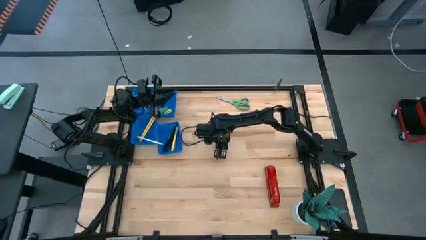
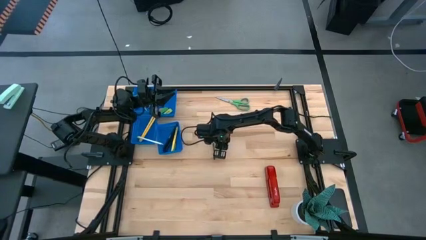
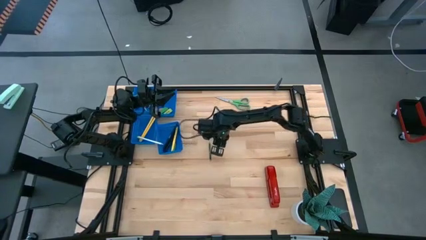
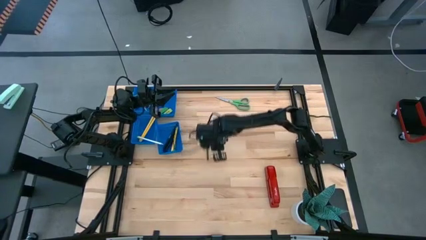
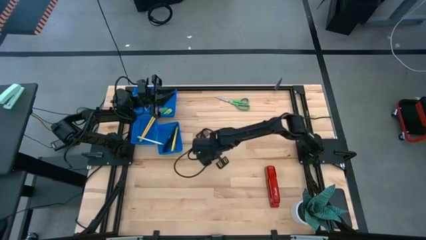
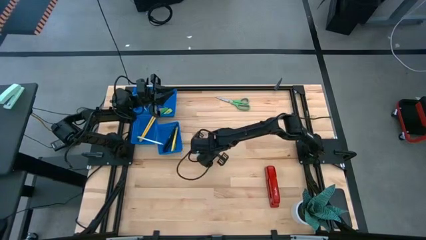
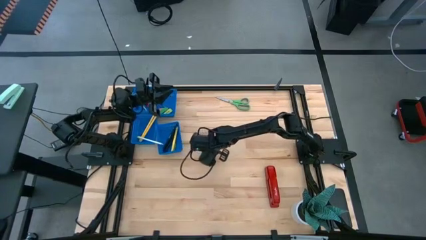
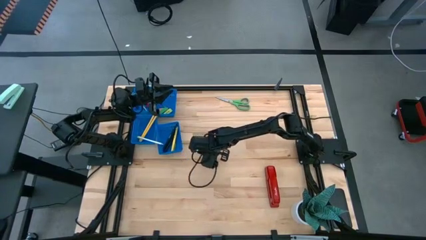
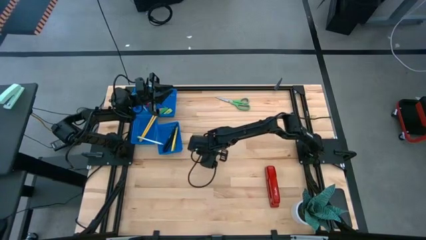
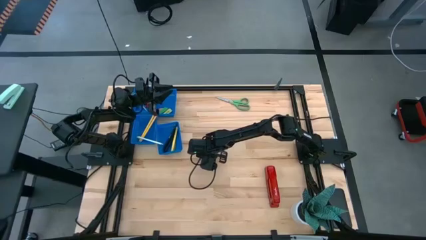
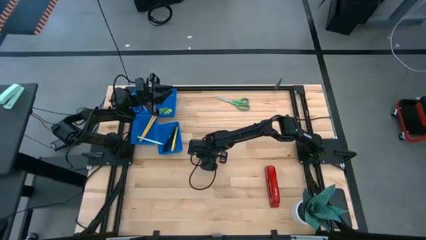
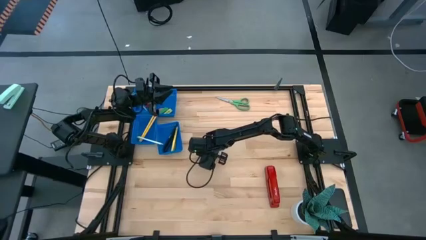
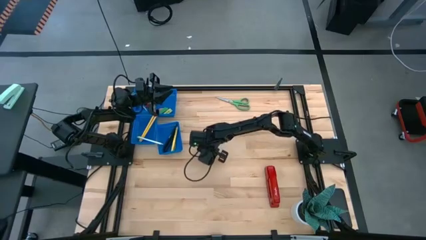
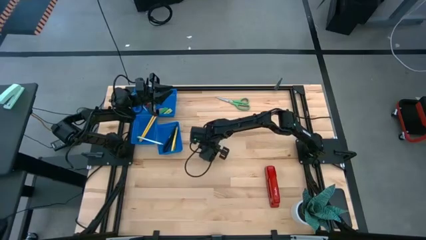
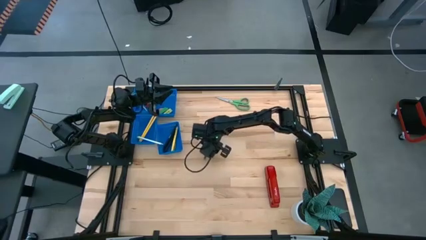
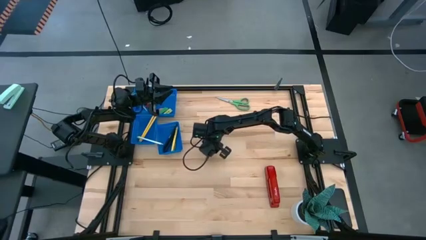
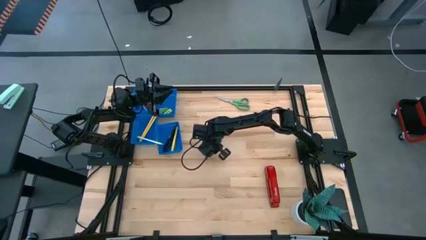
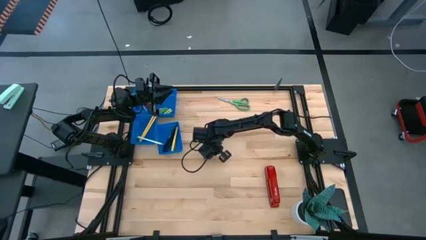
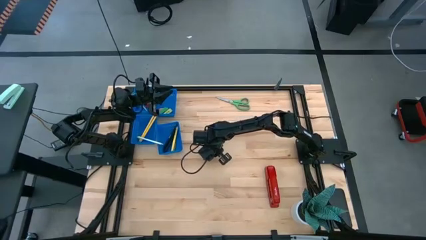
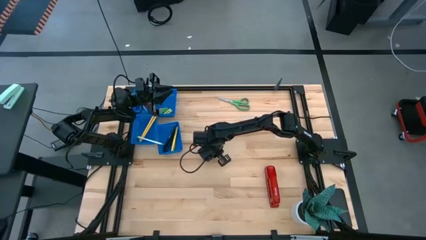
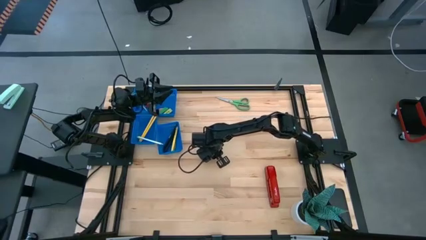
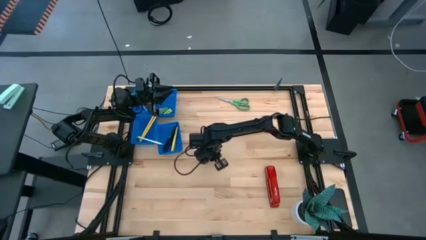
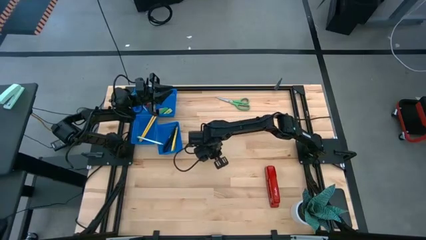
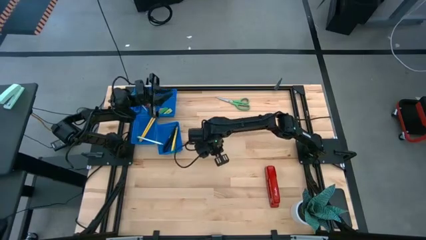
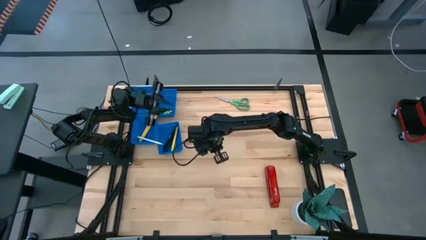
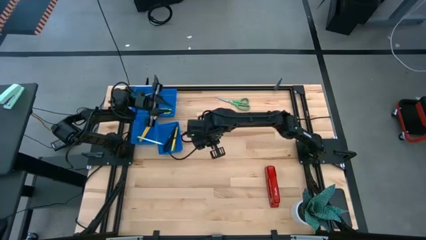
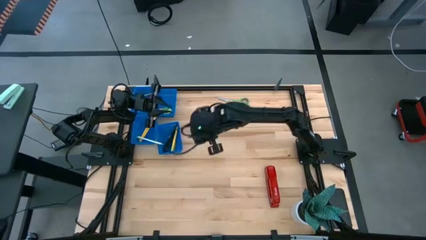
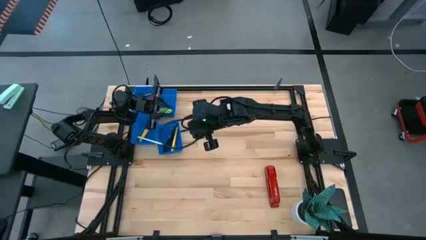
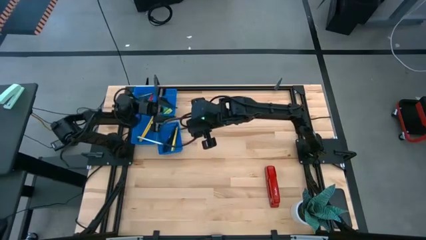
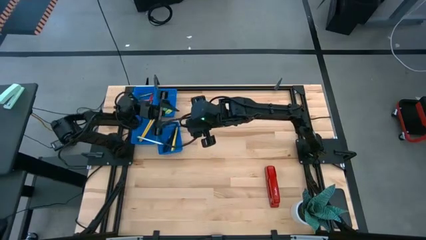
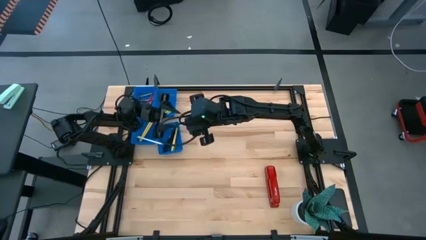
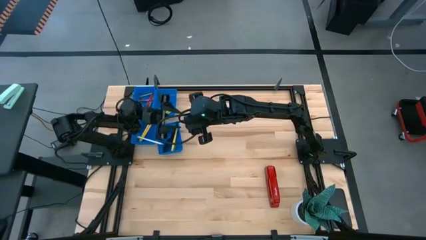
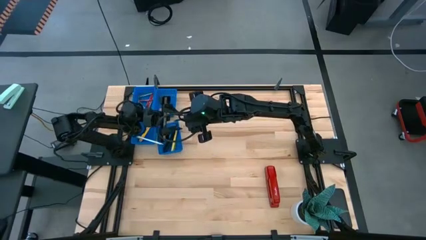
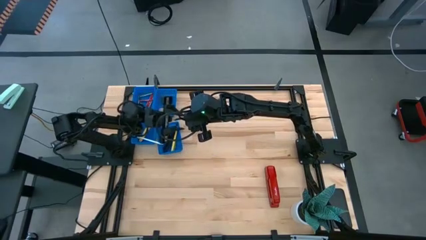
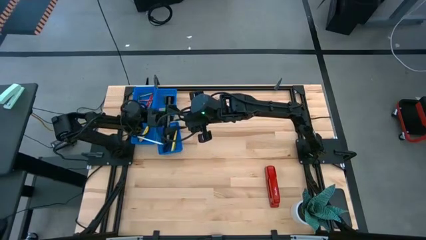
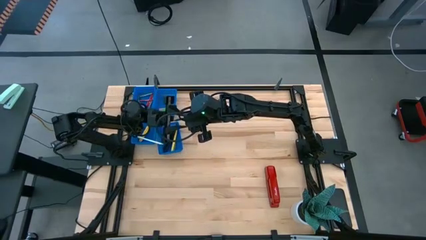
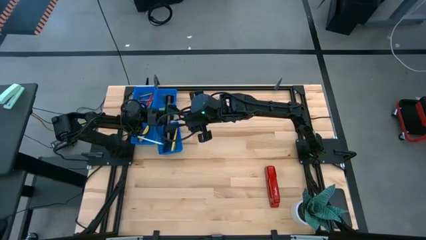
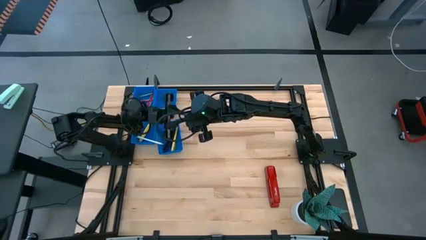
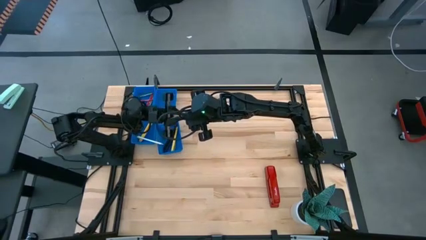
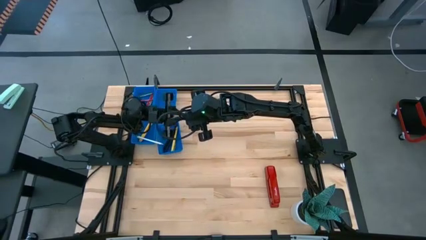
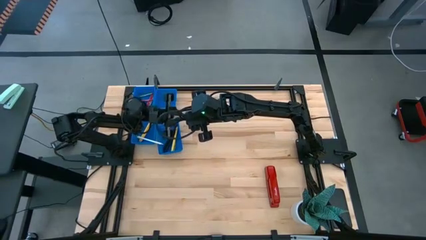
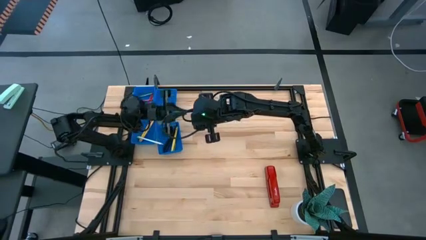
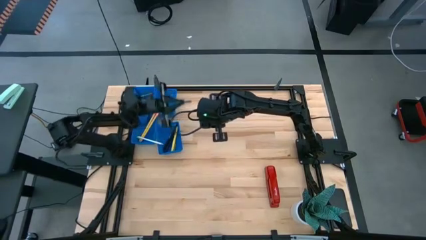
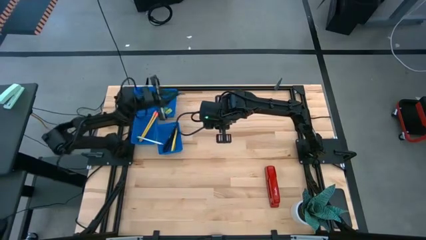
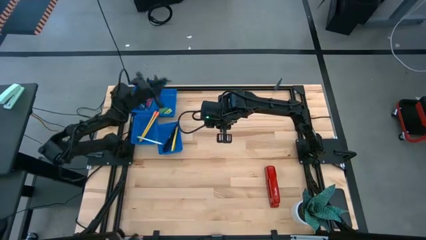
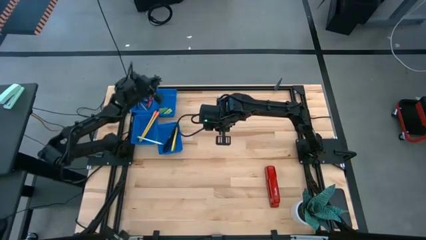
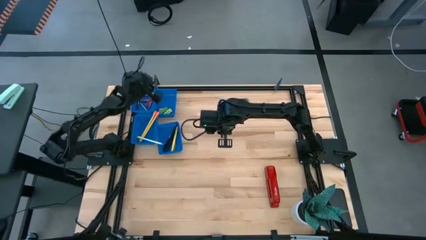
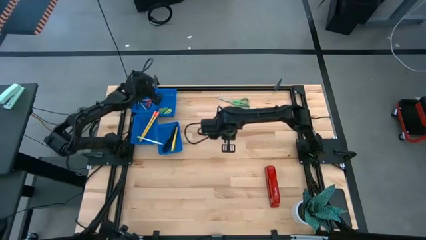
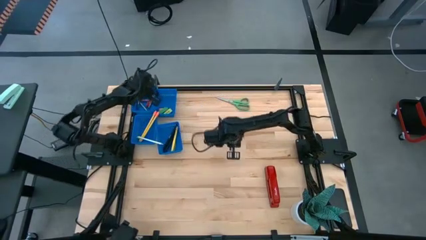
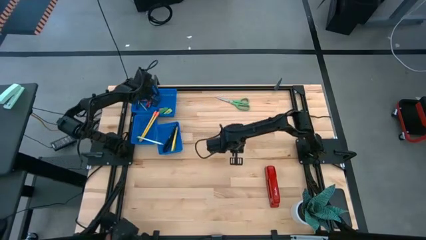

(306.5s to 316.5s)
Task: Sort crayons/erasers/pens/pencils in bins
Put the green crayon into the top left blue bin

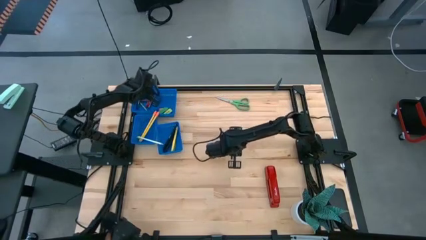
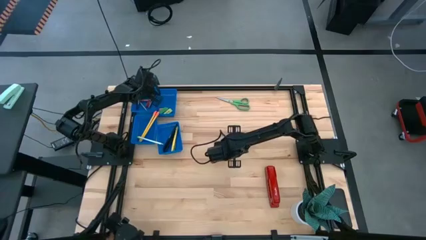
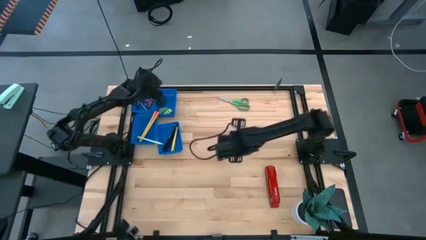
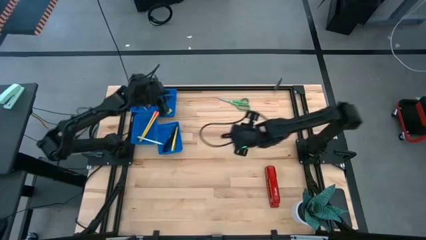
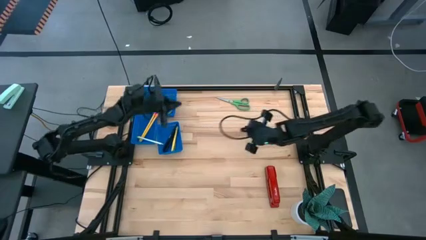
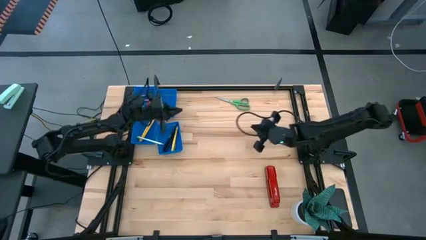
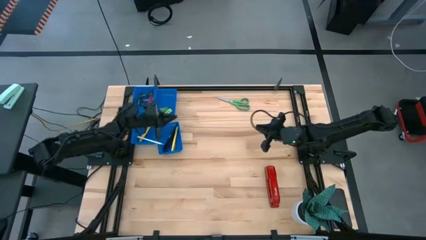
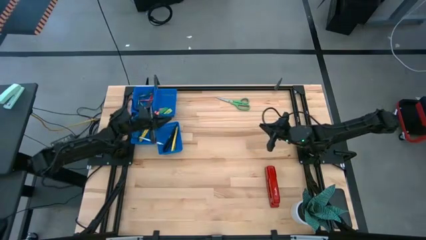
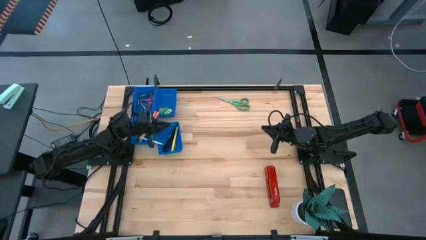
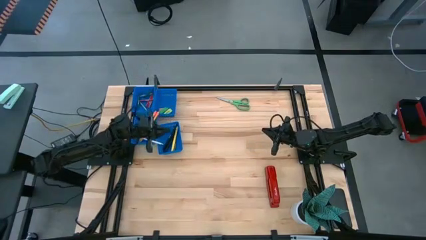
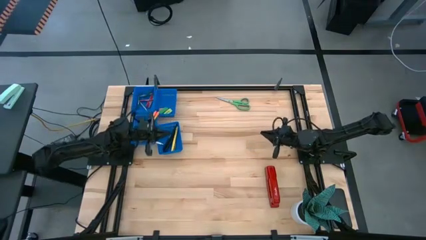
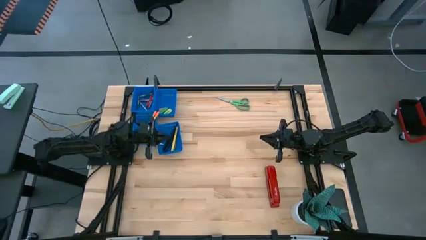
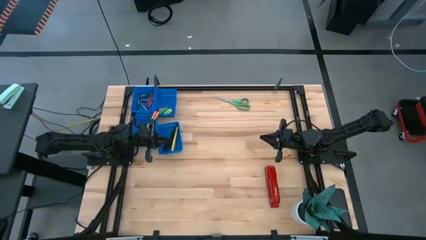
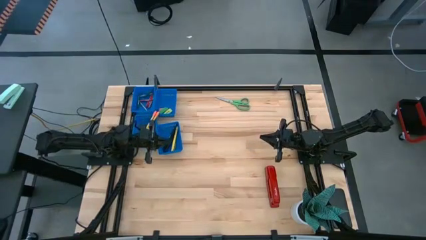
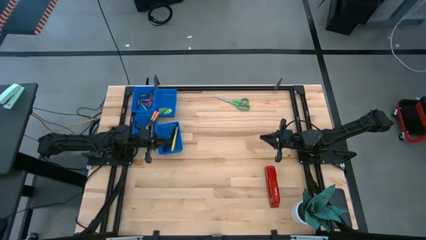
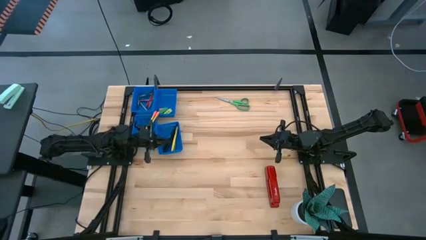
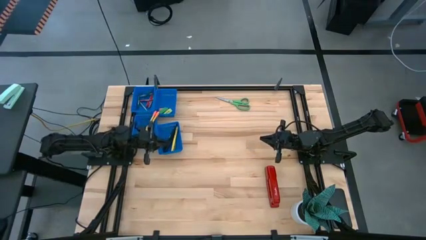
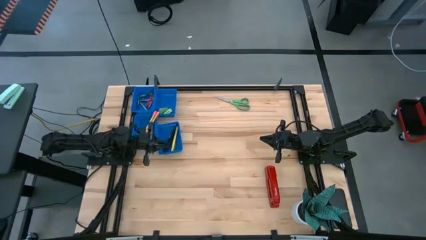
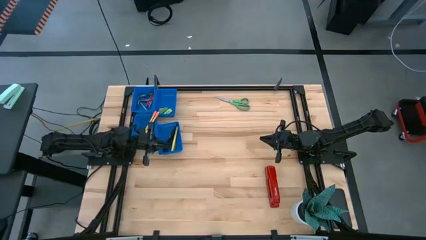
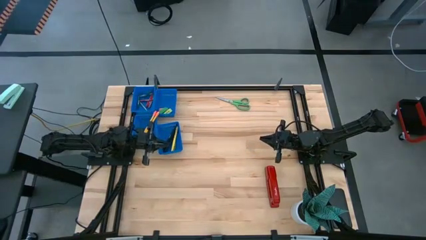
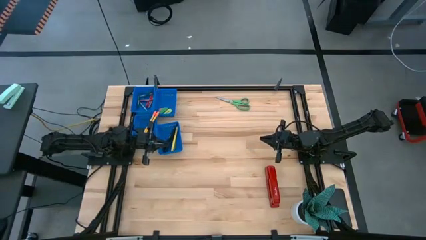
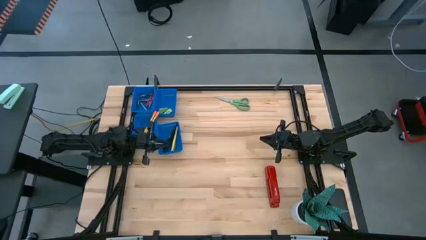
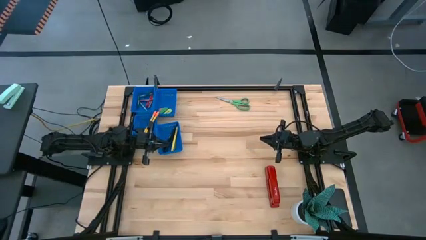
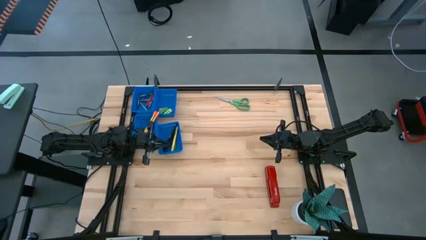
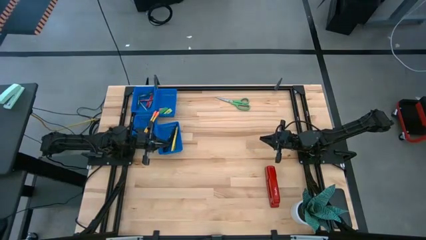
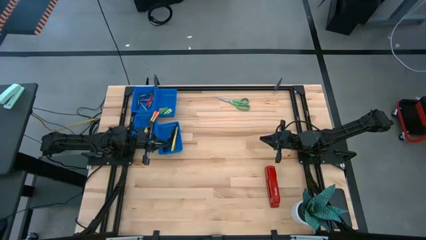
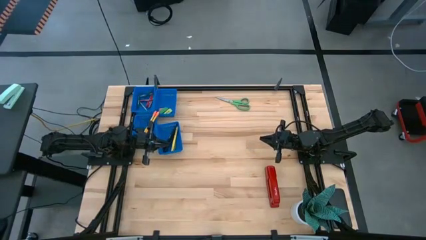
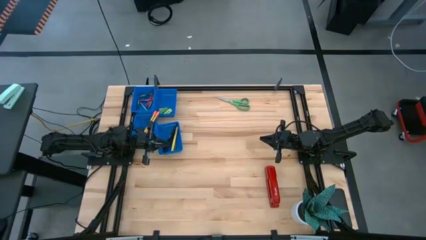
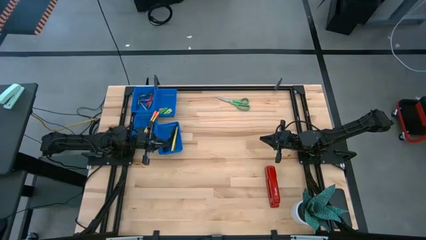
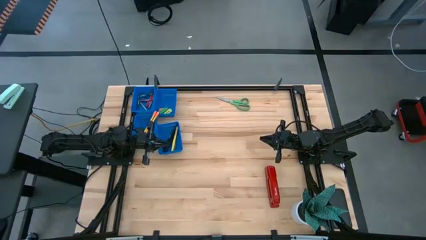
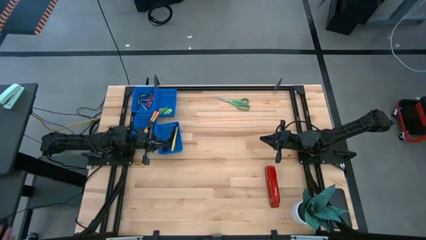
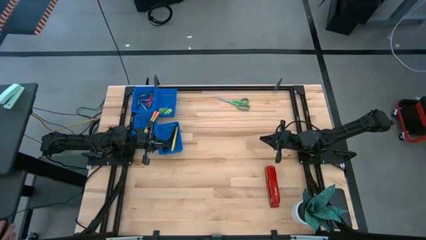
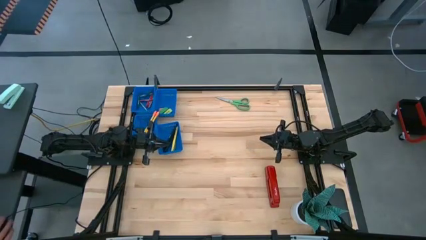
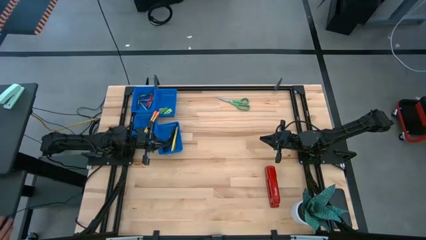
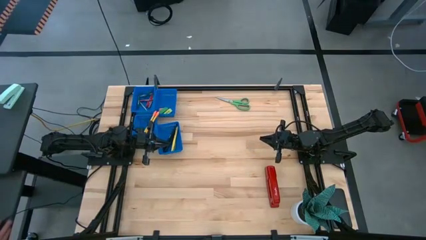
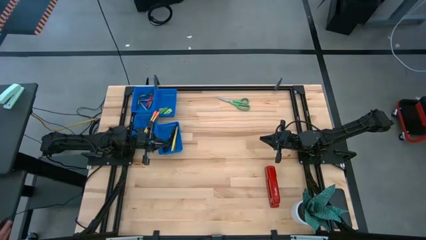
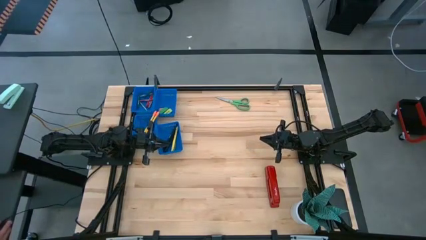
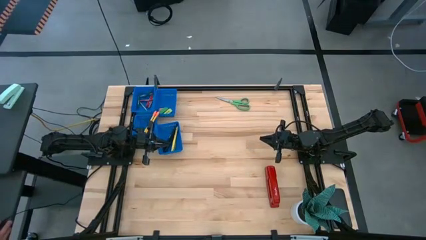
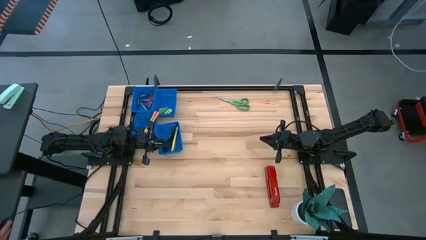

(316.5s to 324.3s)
Return to Home Position
